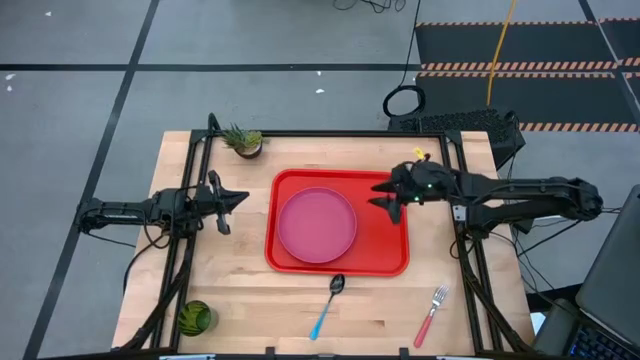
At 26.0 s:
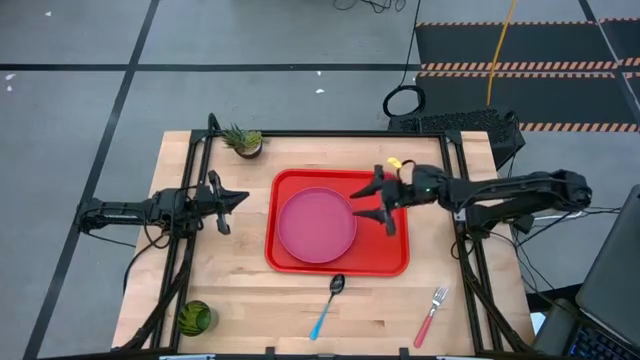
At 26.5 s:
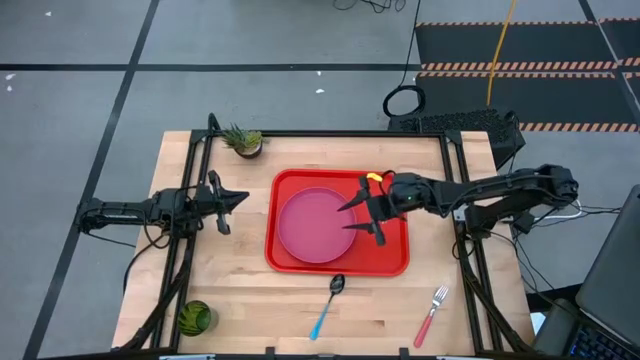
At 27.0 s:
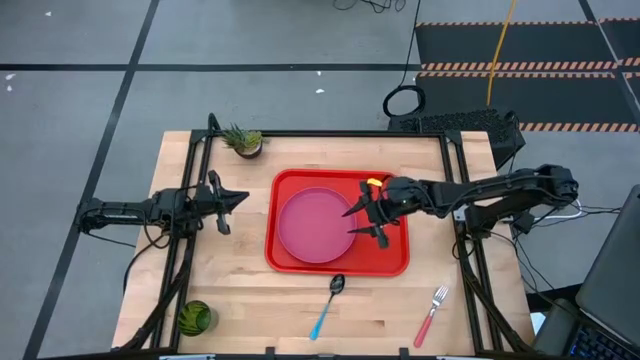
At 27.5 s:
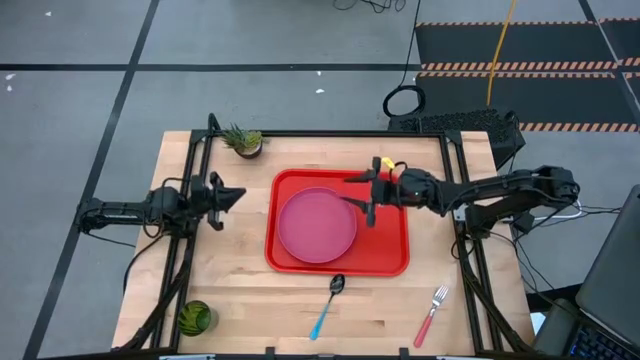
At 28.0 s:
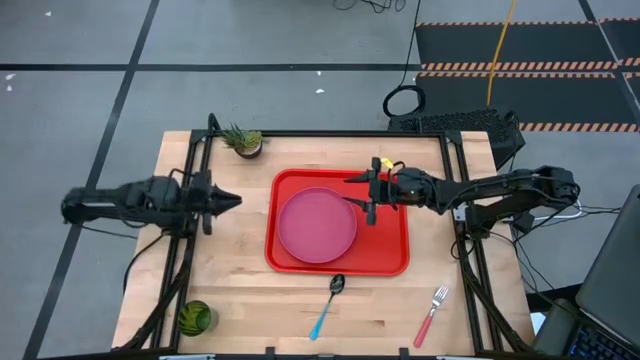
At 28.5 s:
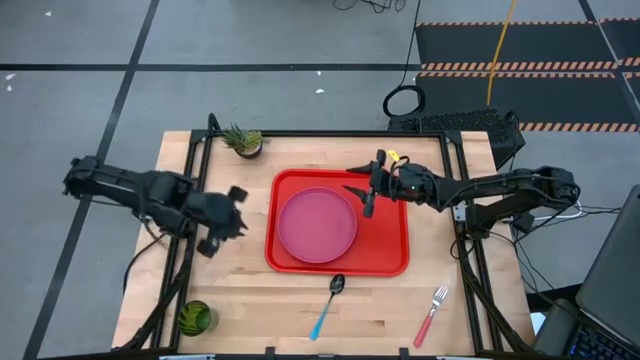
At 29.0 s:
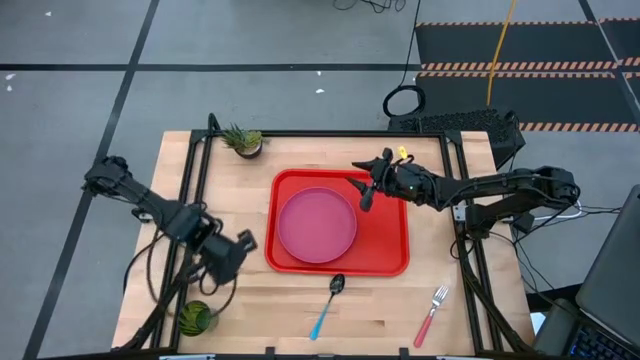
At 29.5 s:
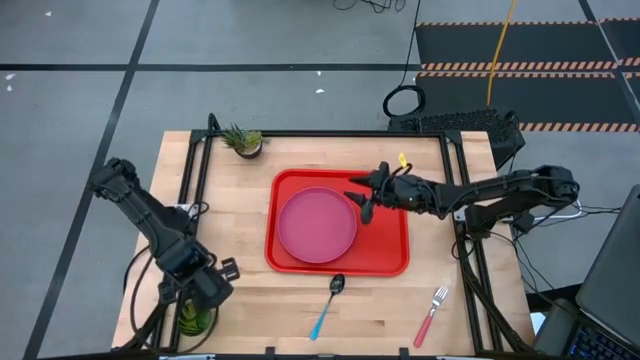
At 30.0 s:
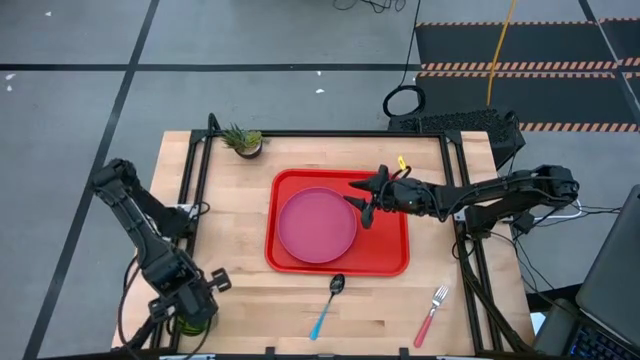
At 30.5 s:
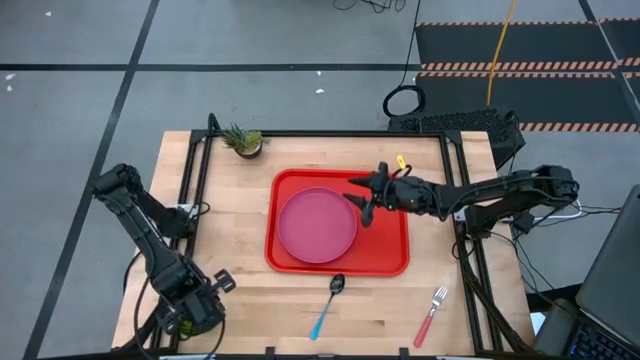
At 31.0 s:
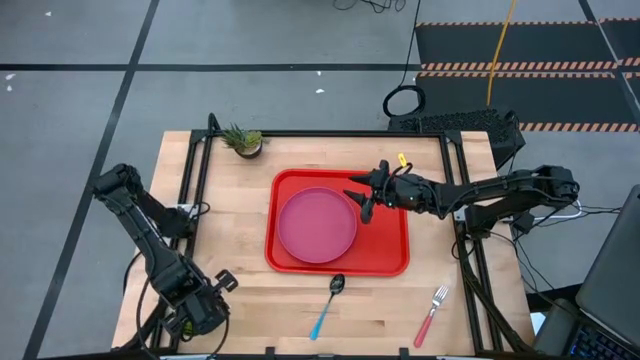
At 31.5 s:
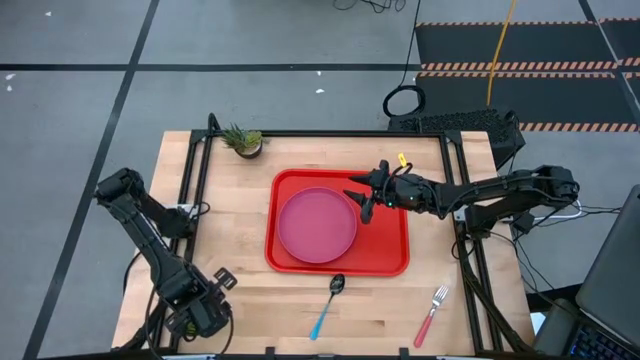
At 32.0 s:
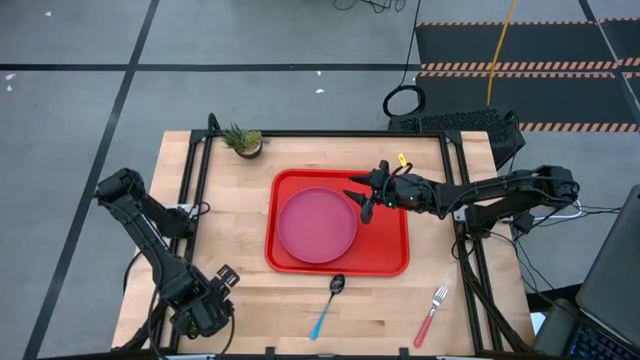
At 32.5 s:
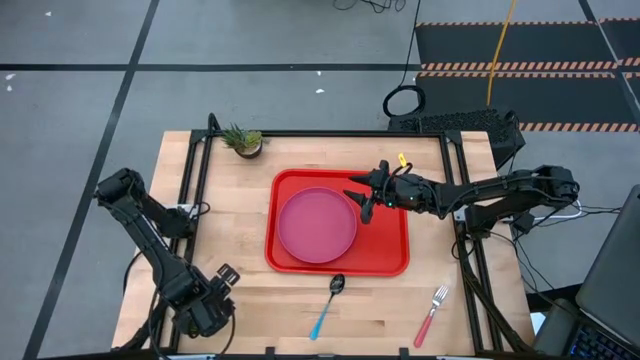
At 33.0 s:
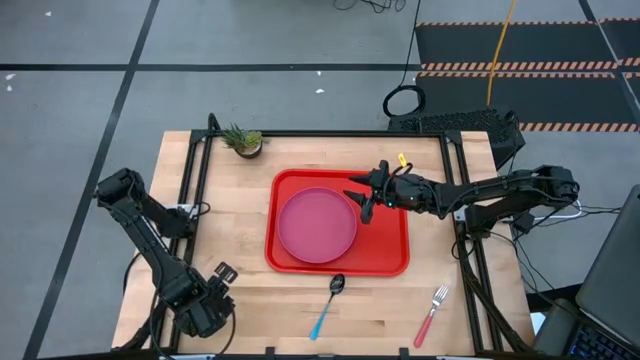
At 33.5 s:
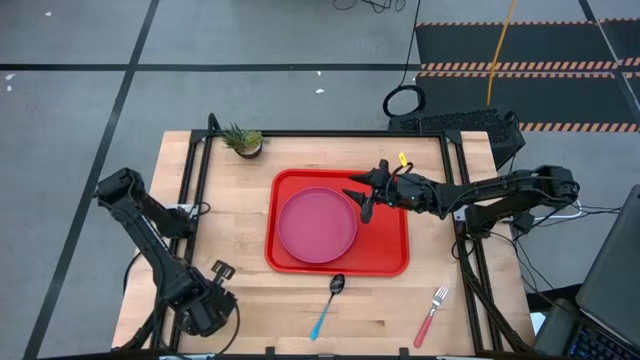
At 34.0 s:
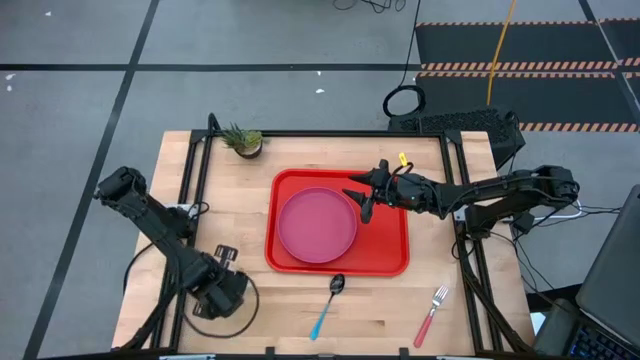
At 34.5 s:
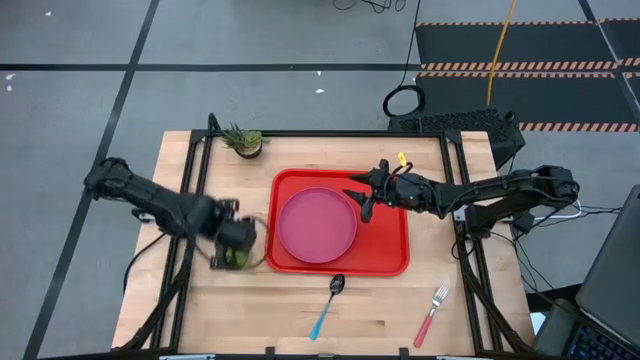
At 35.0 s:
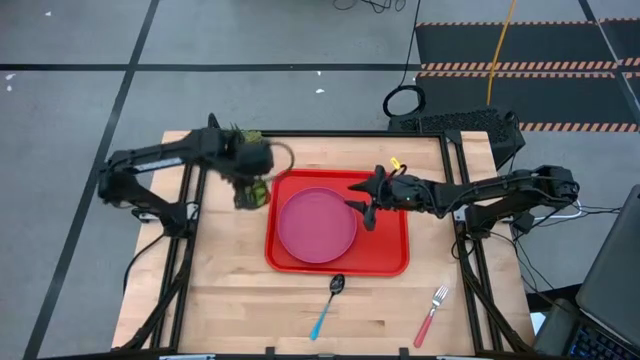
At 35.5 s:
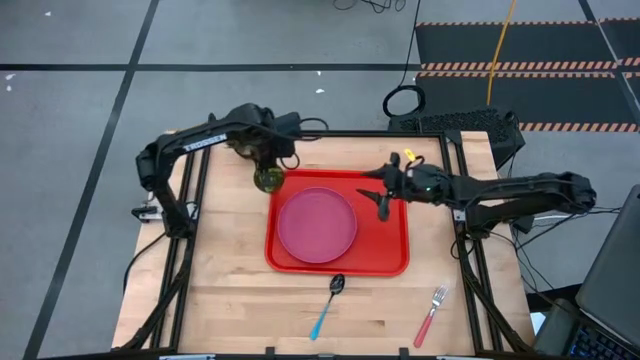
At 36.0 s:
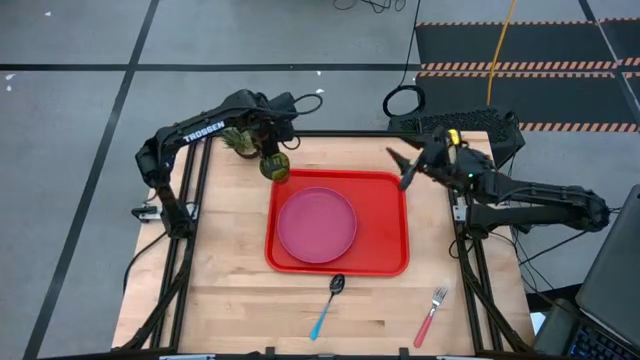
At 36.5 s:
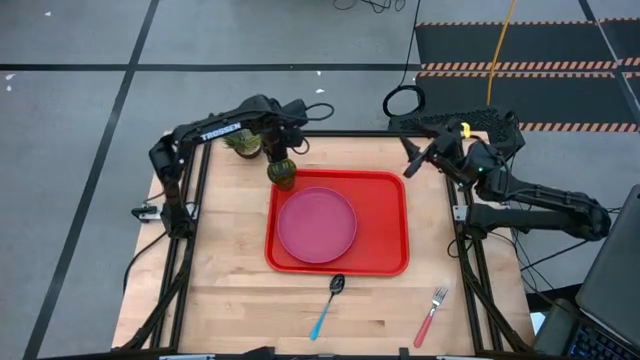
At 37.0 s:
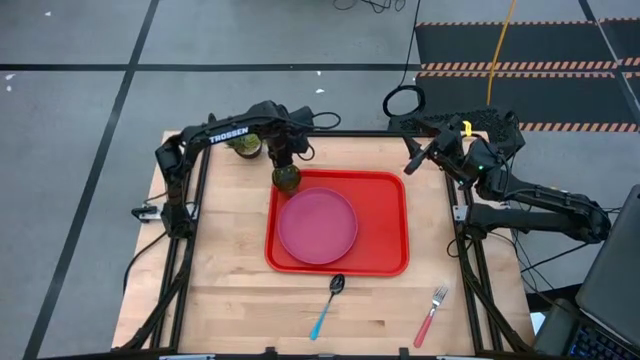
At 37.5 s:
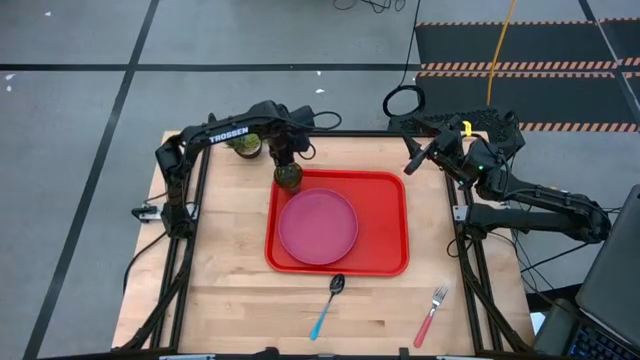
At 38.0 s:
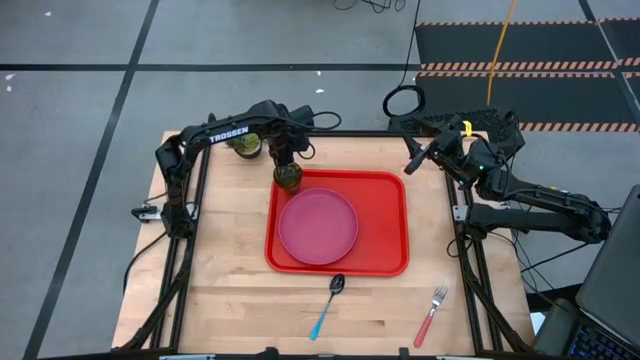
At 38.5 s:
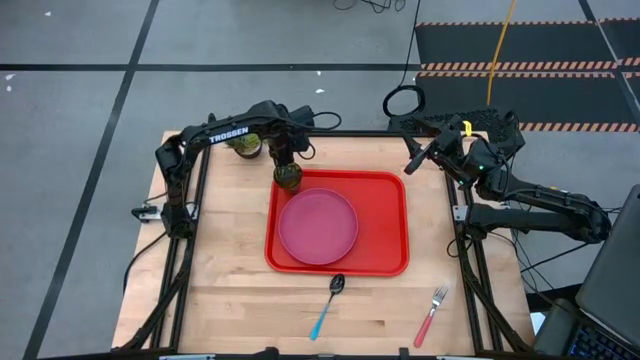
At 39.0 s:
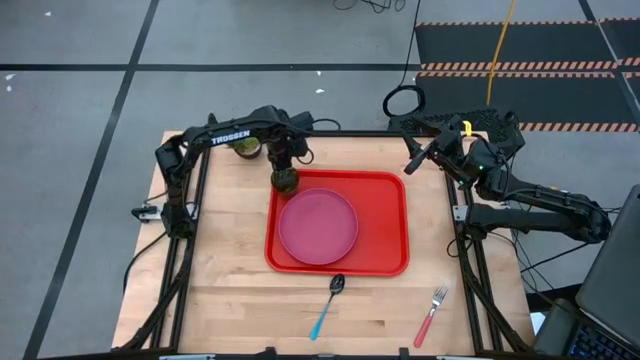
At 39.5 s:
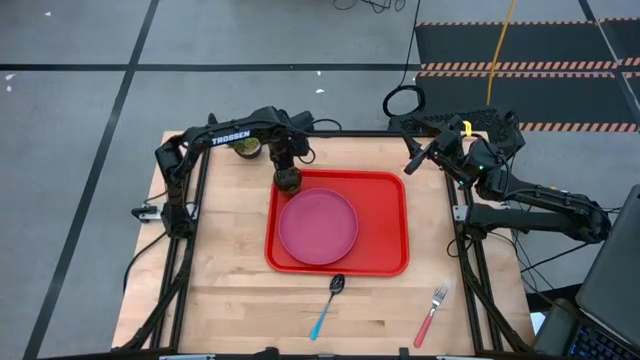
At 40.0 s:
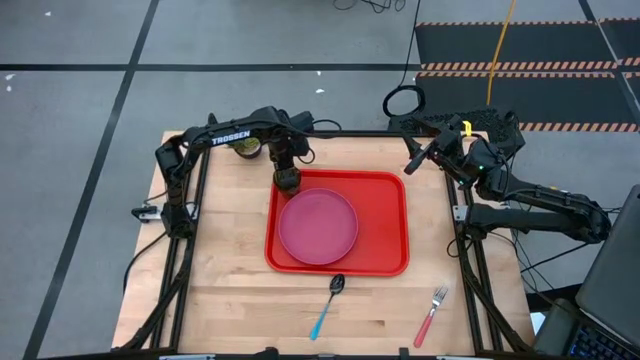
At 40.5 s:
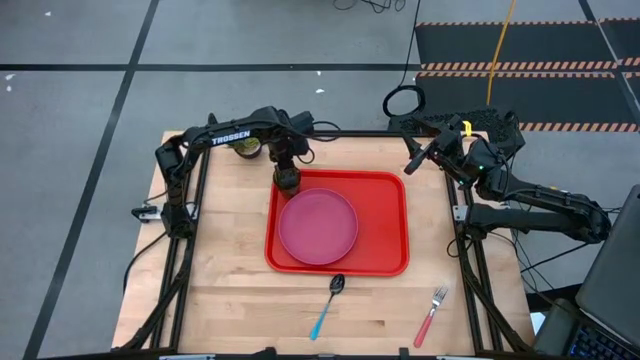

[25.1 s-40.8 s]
Task: Pick and place plate/cup/fork/spoon on tray
Put the green glass on the orange tray to the top left of the pink plate

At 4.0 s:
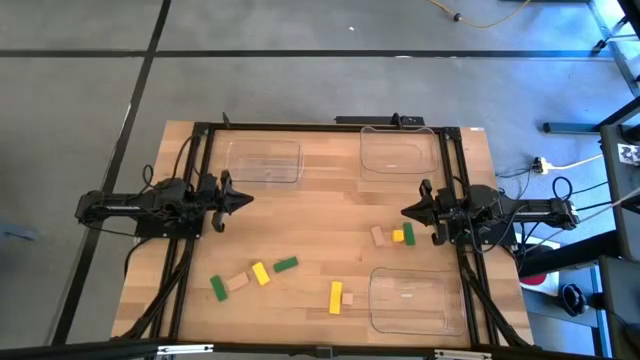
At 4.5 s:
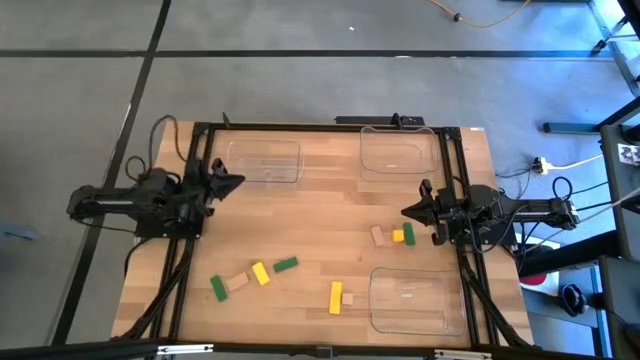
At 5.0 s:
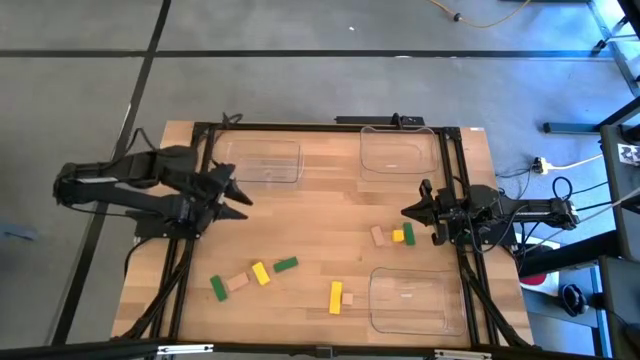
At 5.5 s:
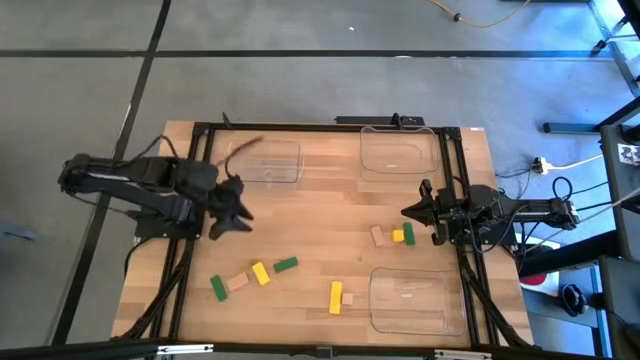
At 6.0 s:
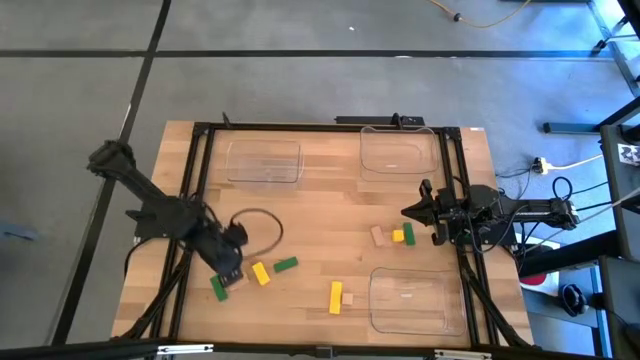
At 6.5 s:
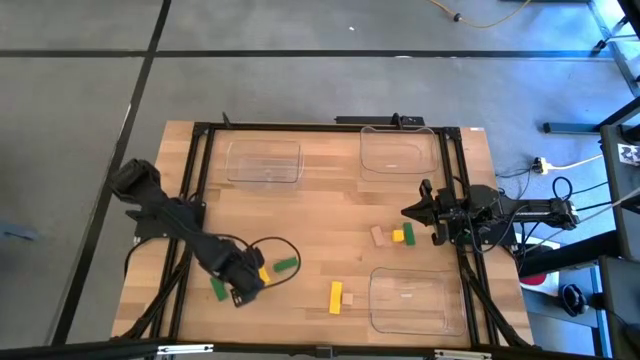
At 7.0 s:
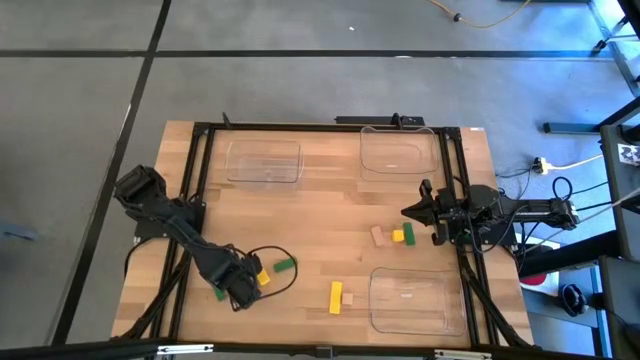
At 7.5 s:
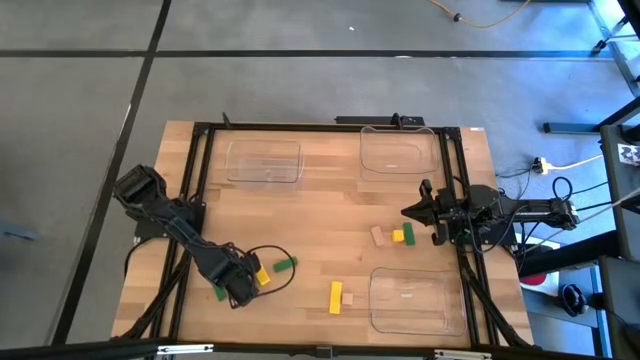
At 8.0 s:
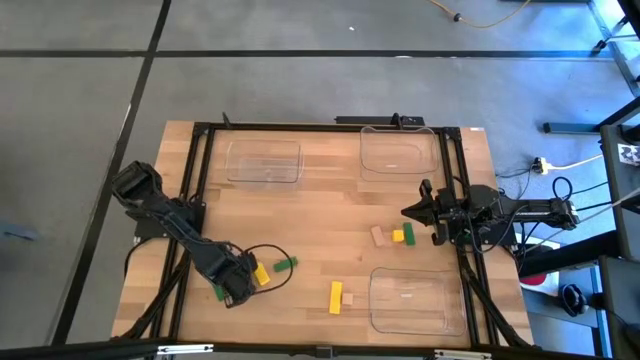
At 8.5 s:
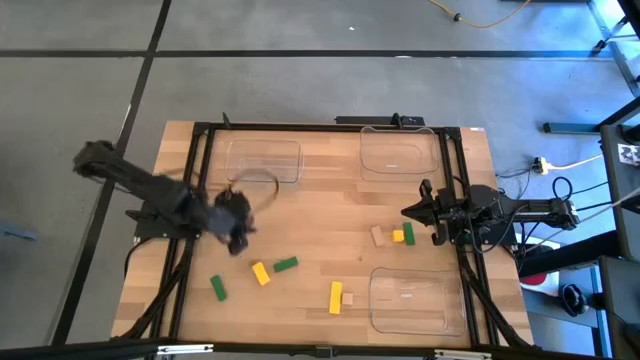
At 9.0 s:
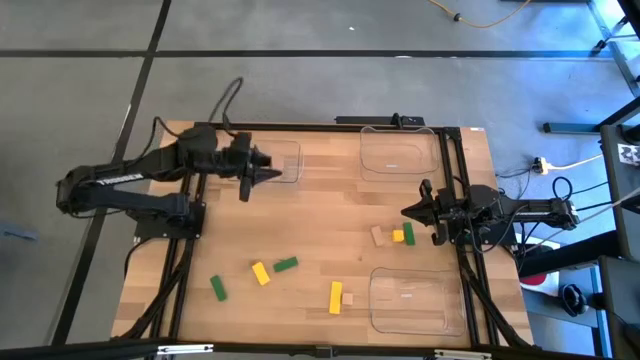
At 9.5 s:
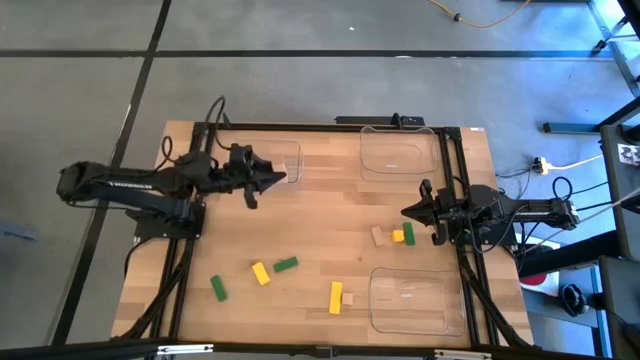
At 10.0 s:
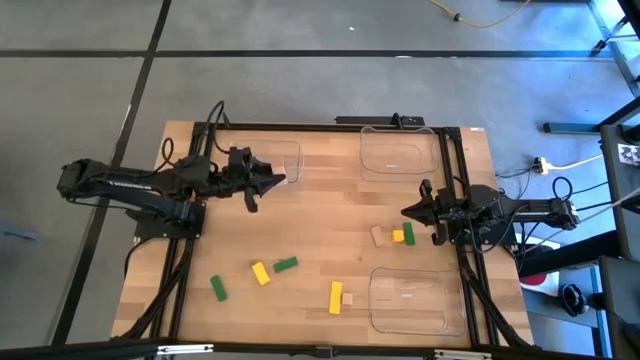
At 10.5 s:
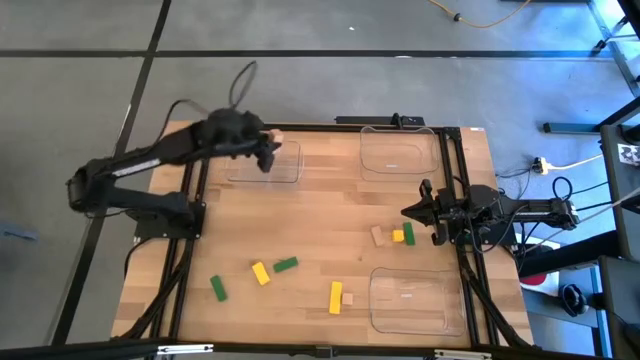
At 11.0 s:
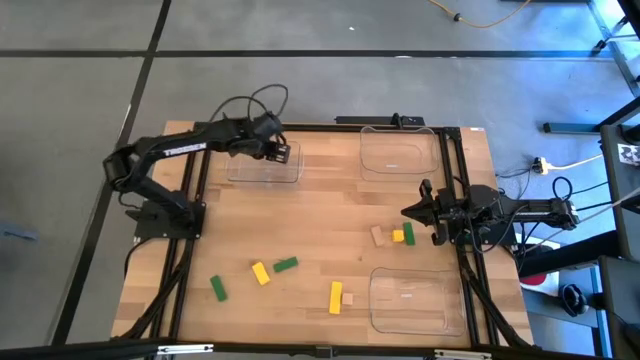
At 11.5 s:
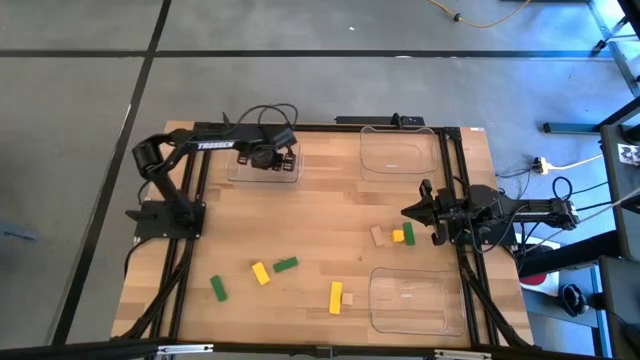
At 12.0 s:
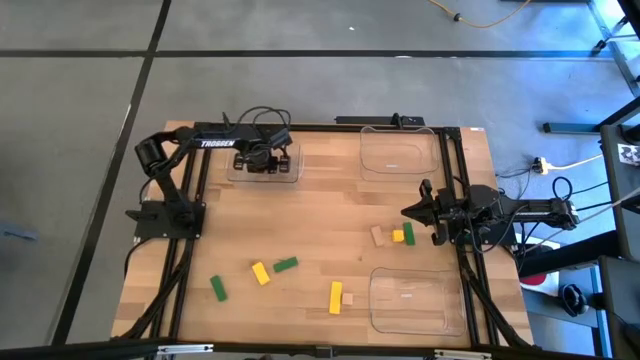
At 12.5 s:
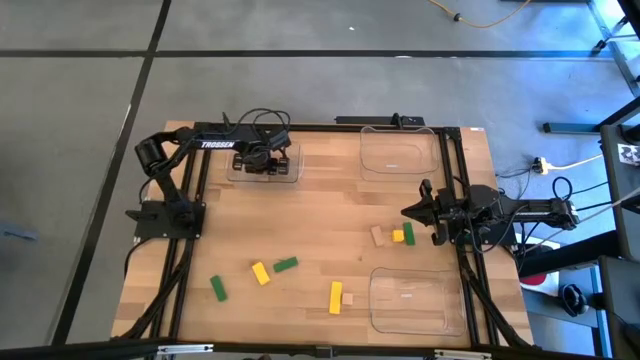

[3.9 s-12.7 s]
Task: Sort & place blocks by color
Put the left brown block into the top left transparent bin
